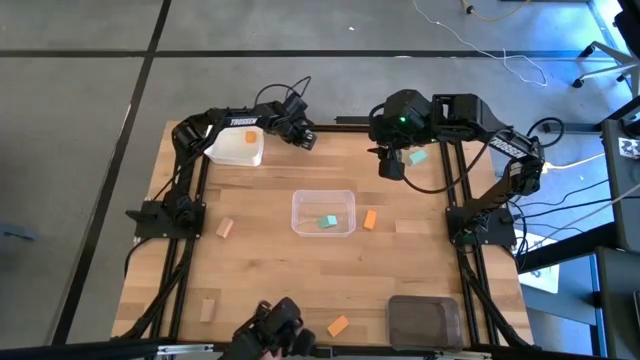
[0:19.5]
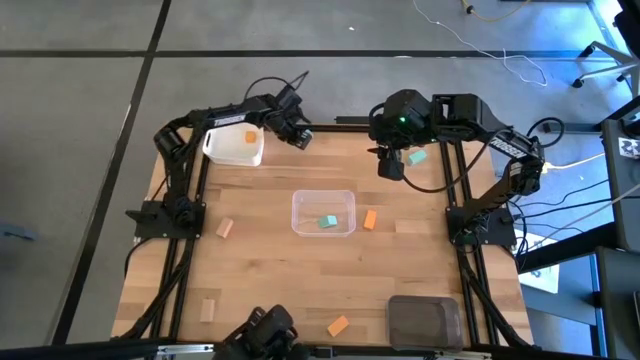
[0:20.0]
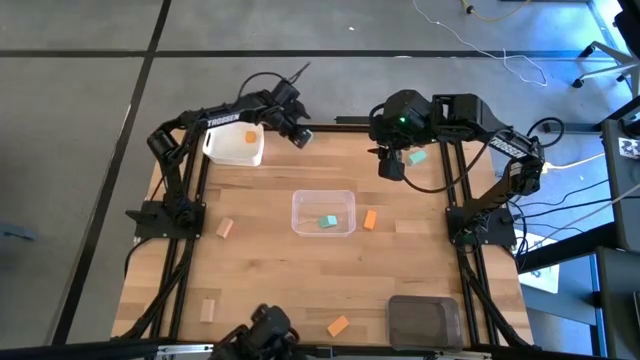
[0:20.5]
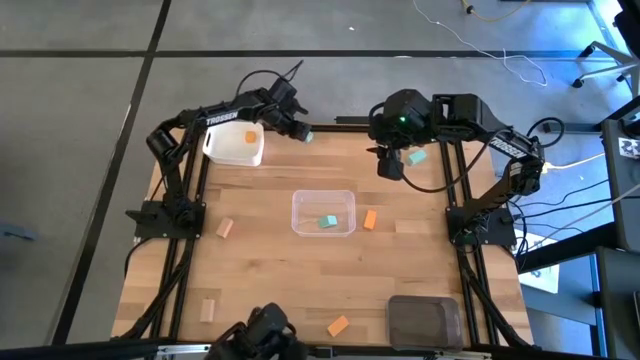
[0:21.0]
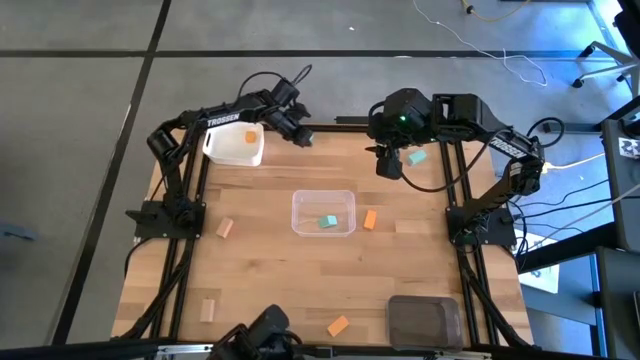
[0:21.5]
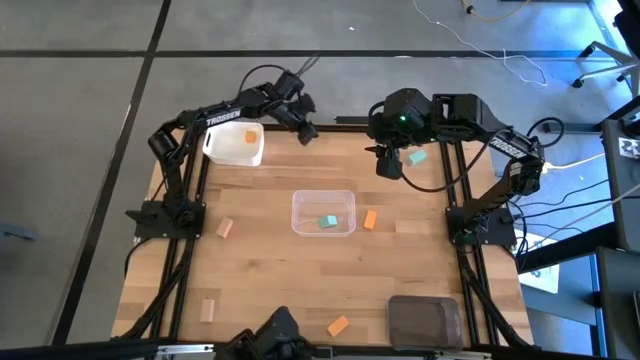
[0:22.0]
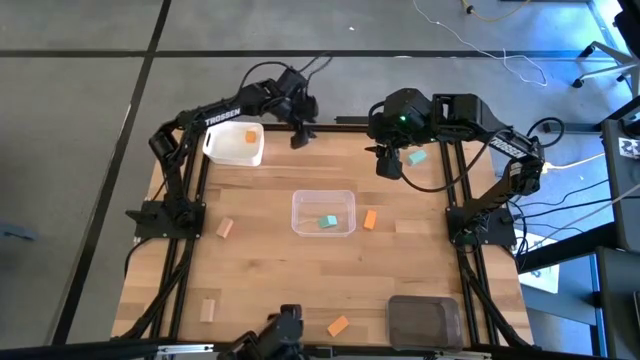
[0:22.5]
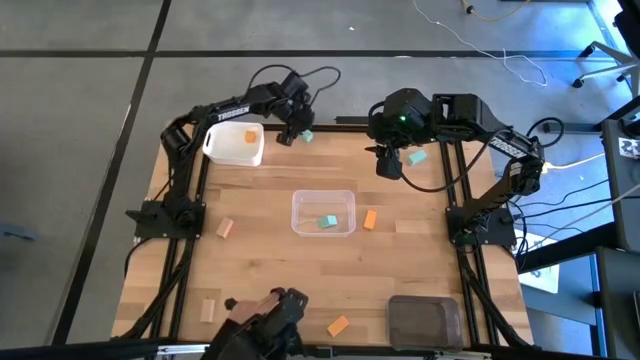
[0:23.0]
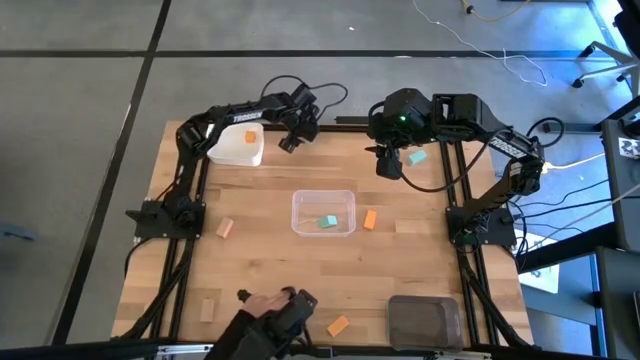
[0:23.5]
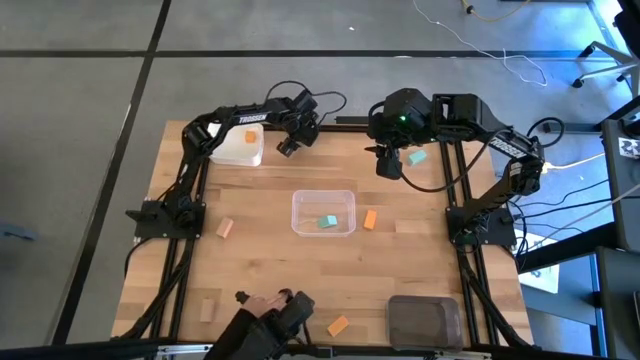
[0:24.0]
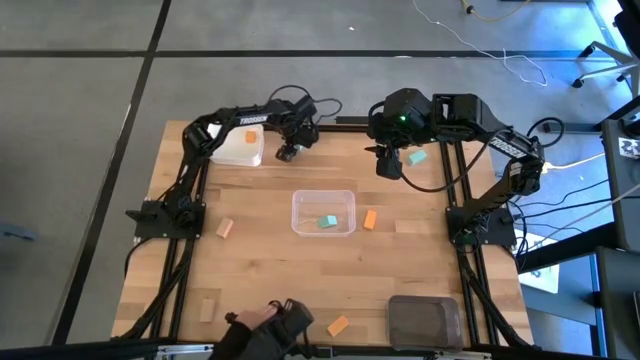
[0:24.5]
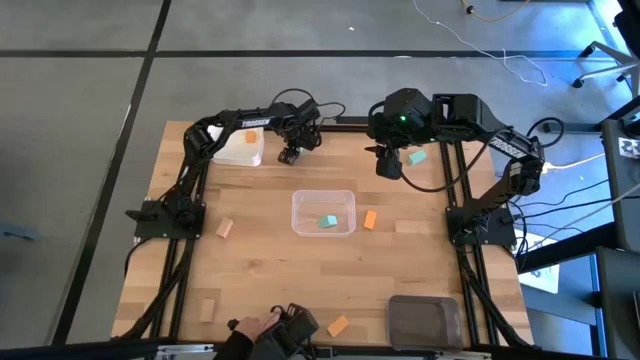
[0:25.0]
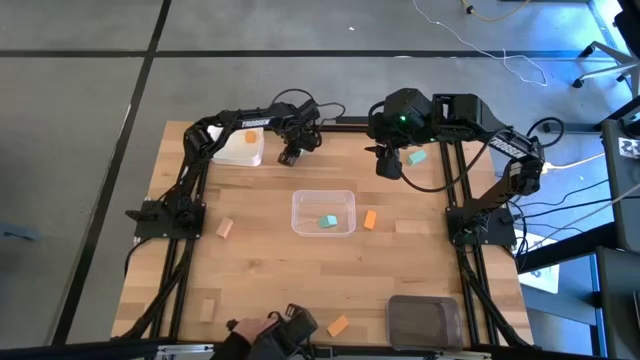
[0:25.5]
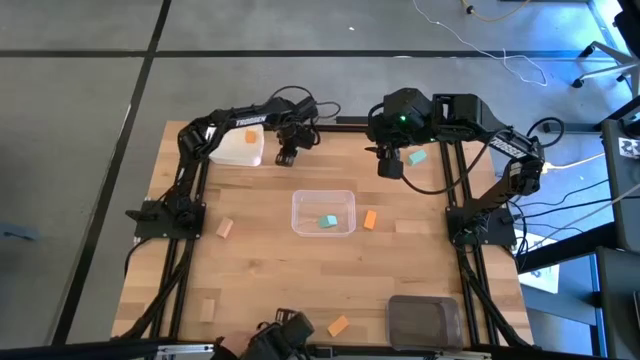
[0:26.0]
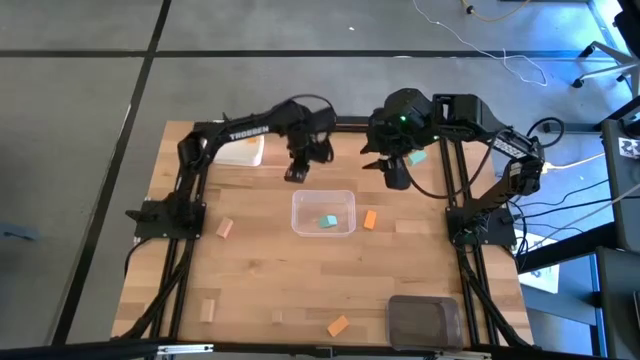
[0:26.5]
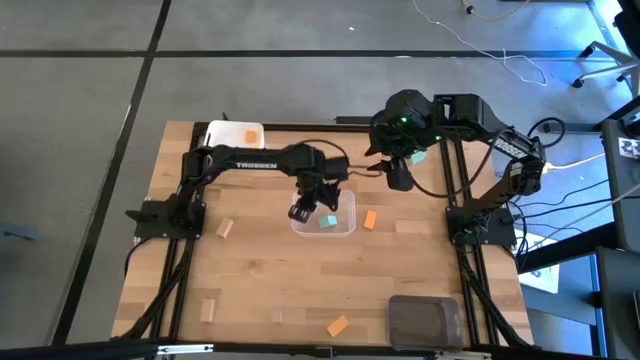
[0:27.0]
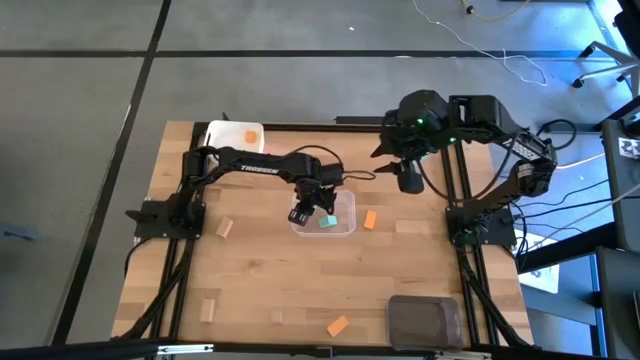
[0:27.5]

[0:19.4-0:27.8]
Task: Sort & place blocks by color
Put the left blue block into the transparent bin

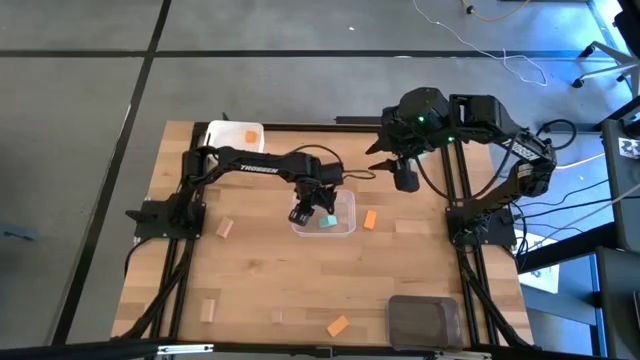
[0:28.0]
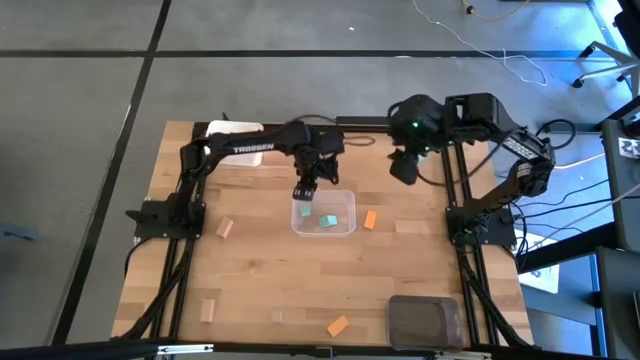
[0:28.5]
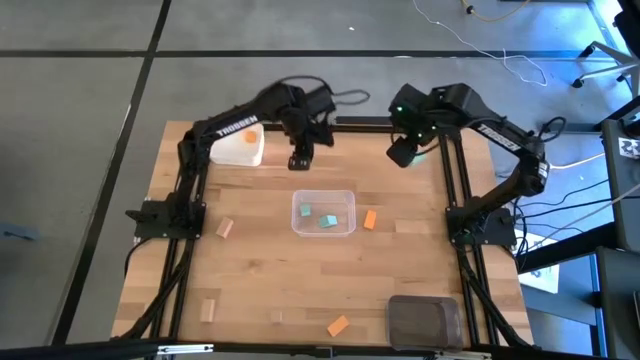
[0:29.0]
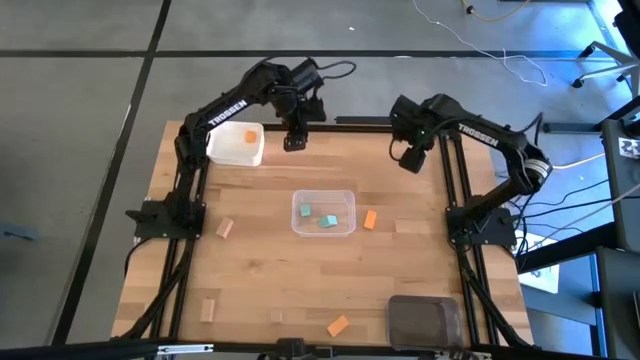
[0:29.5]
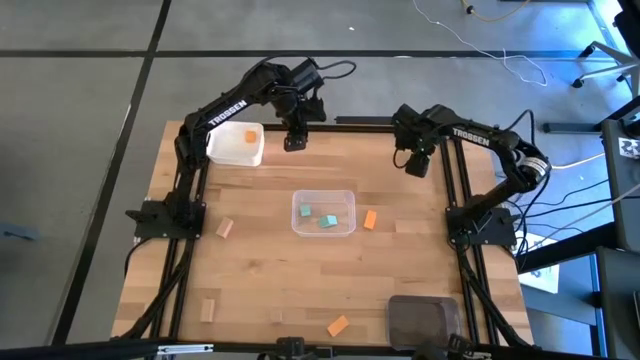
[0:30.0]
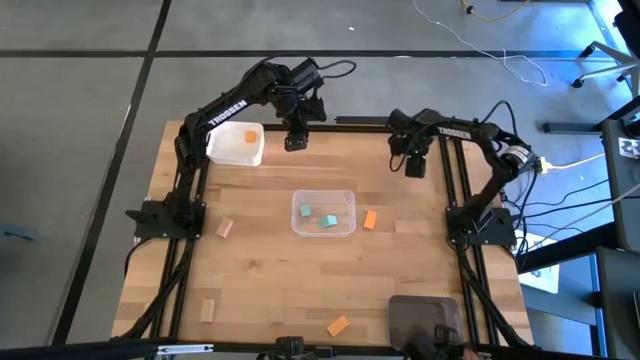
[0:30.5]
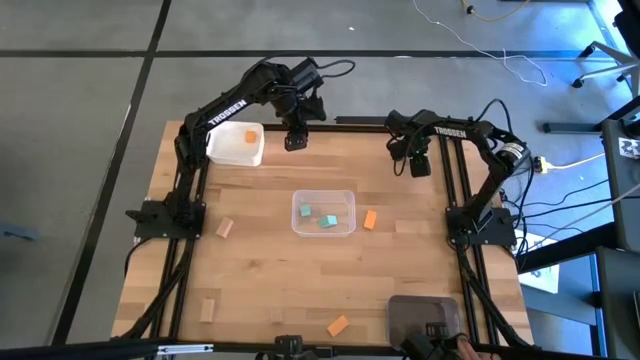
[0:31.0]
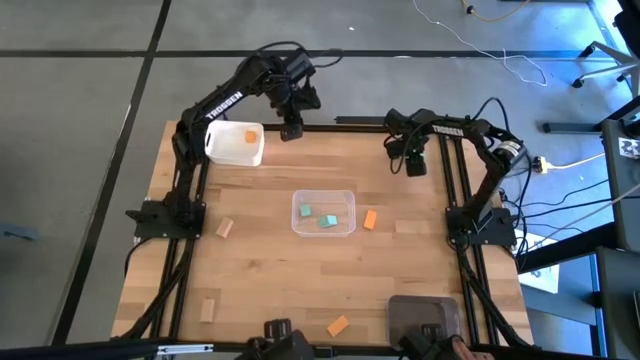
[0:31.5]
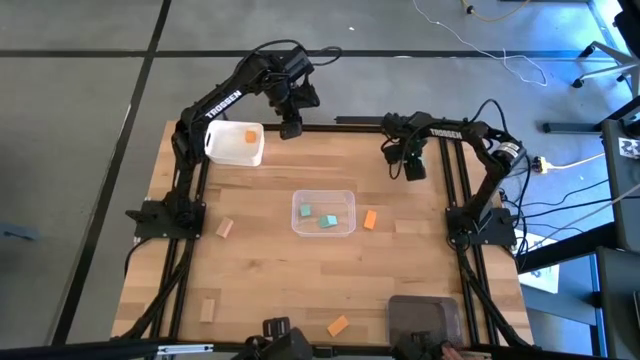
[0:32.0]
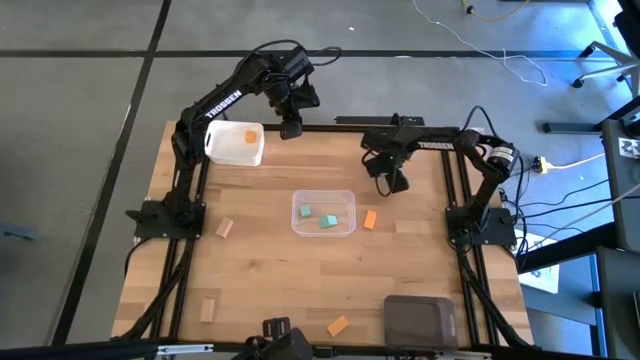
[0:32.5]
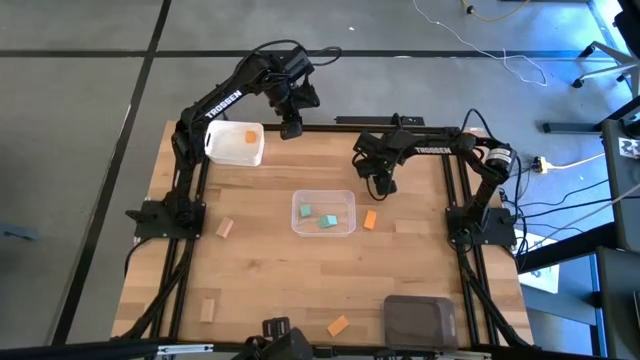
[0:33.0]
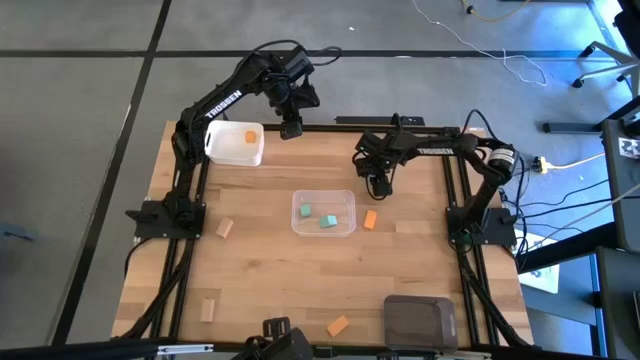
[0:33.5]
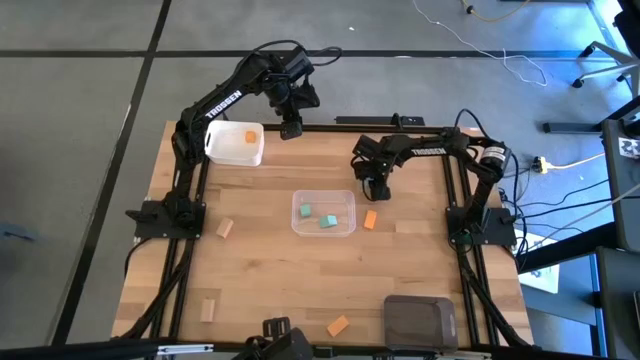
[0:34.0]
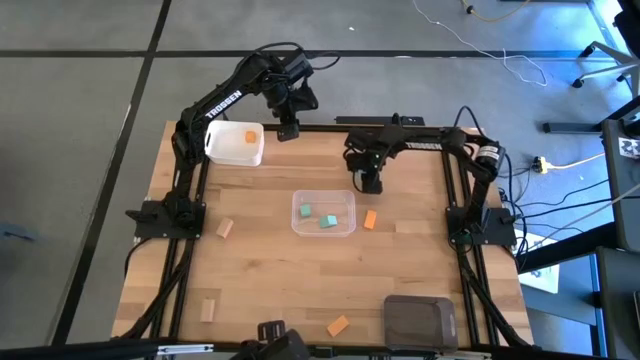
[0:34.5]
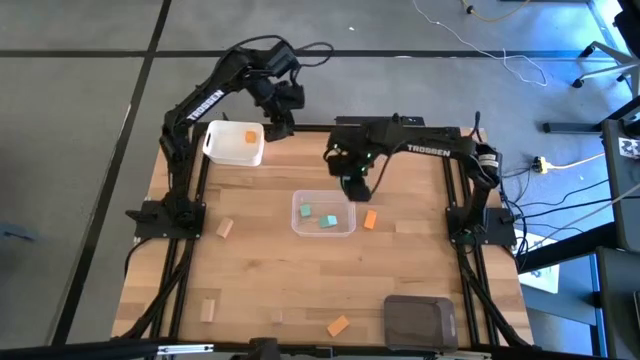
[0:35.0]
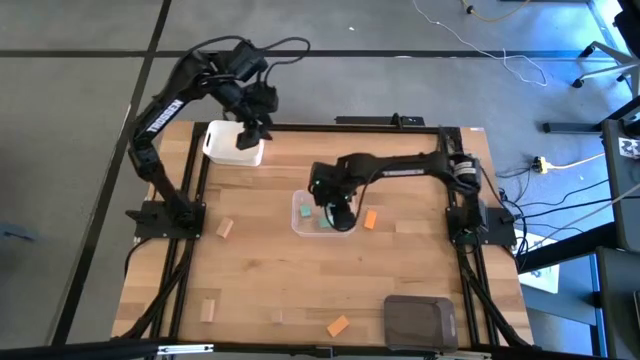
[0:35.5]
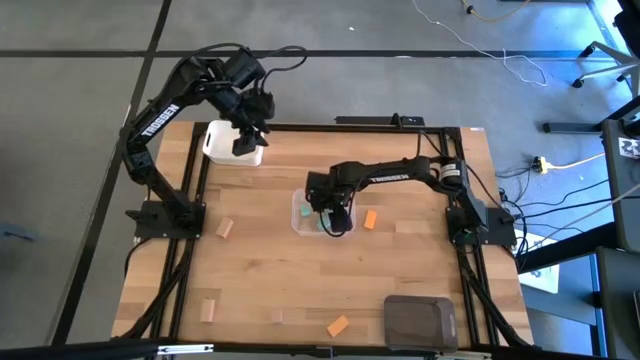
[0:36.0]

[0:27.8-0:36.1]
Put the blue block into the transparent bin

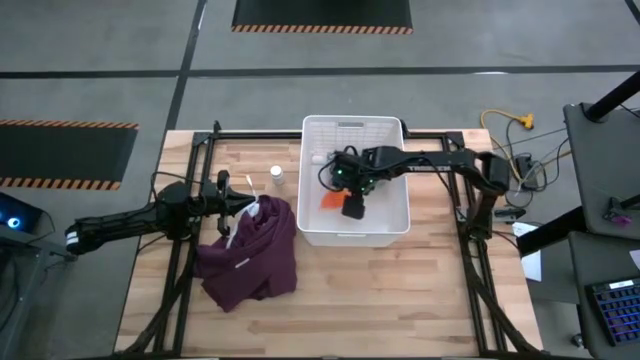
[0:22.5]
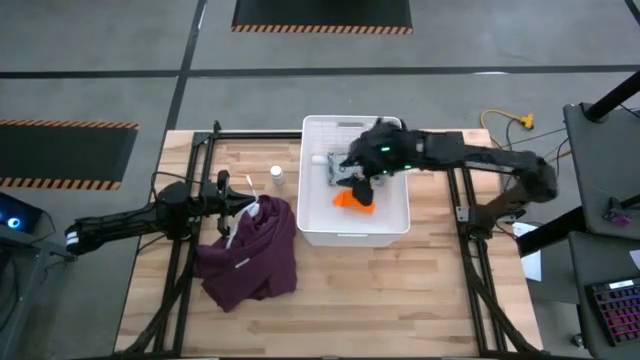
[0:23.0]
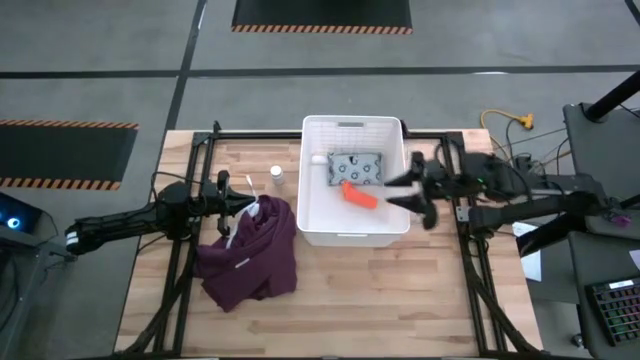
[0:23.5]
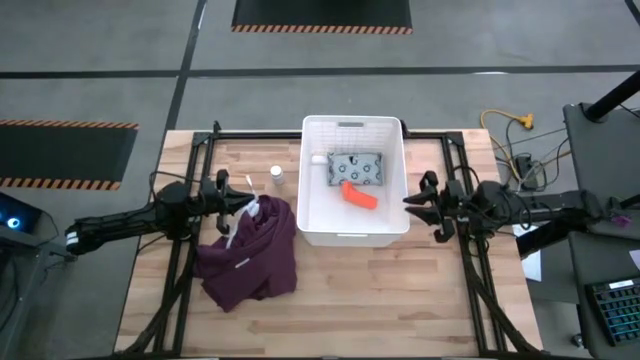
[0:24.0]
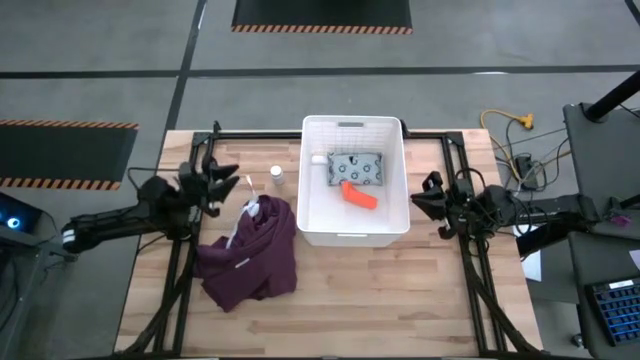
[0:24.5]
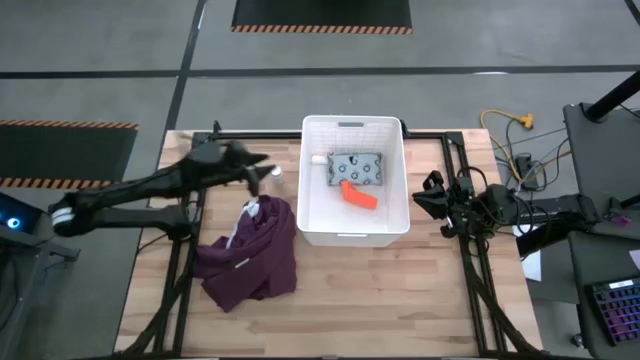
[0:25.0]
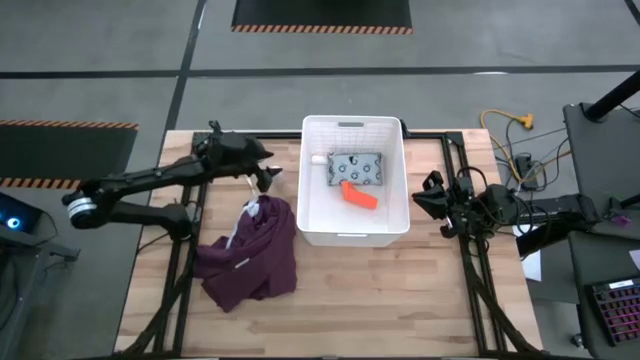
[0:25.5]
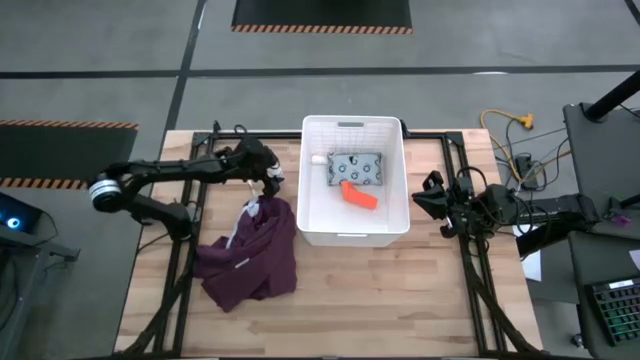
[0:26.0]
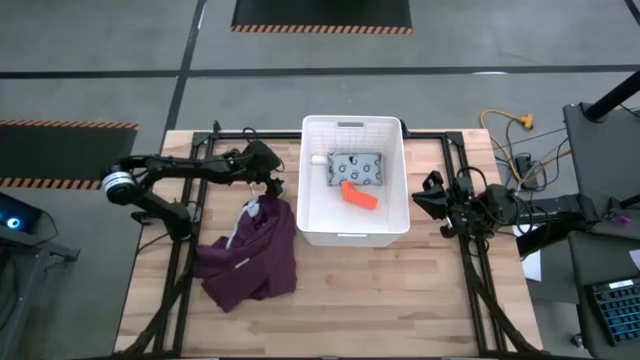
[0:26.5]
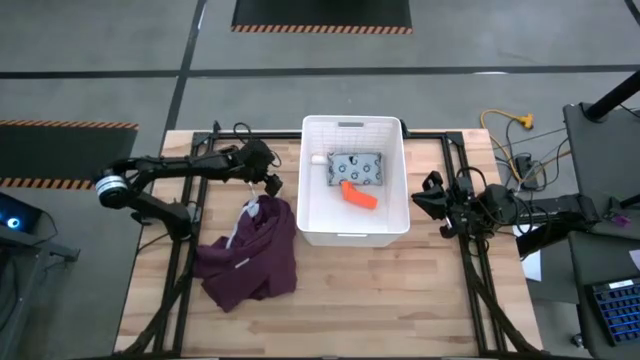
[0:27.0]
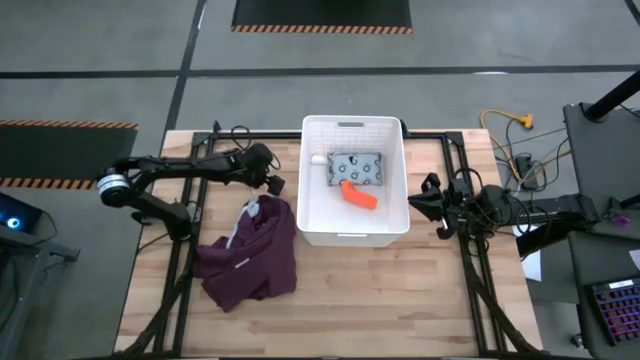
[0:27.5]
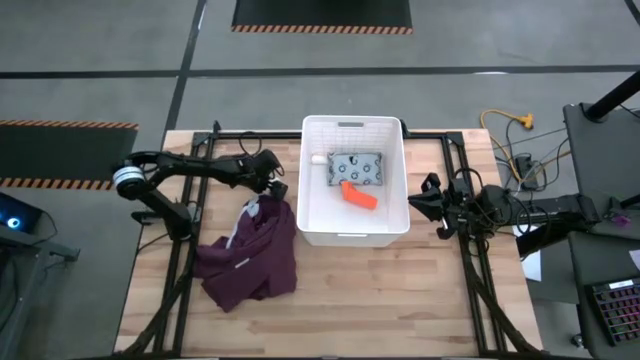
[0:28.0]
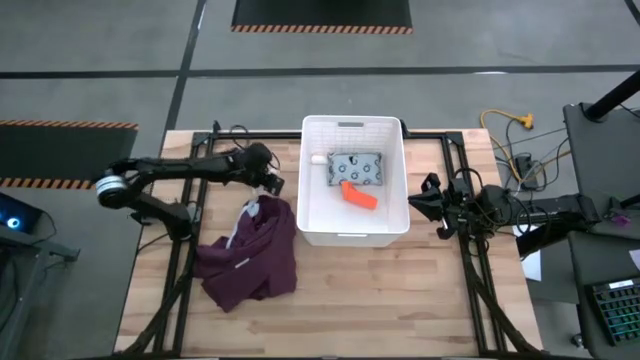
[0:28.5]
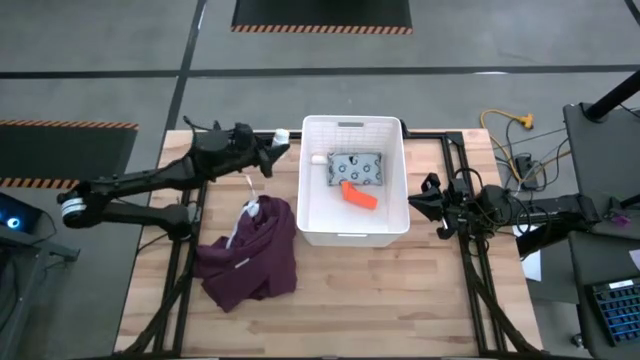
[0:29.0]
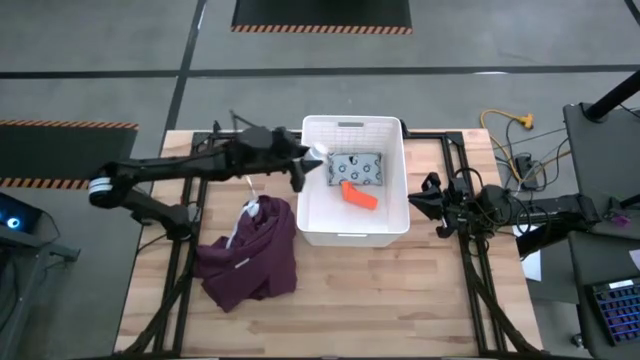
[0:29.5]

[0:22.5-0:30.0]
Task: Pick & place medical supplies in basket/bin
Put the white pill bottle into the white bin
